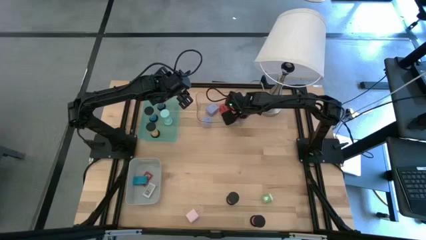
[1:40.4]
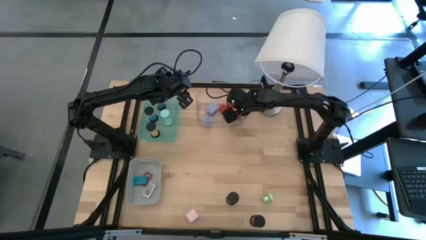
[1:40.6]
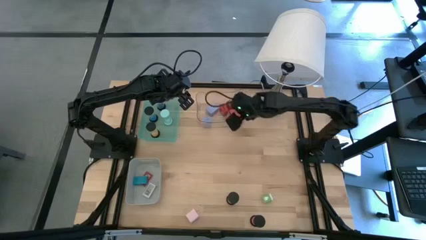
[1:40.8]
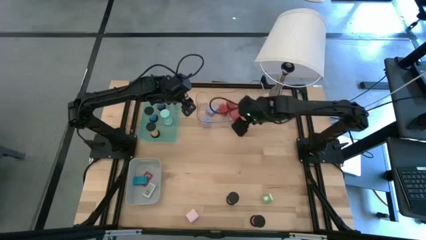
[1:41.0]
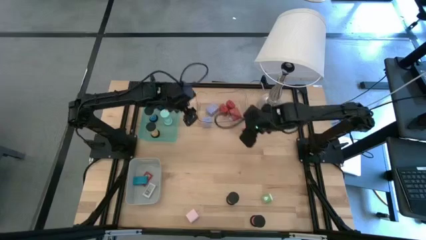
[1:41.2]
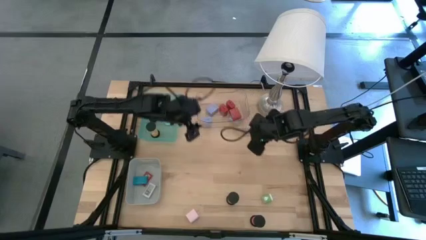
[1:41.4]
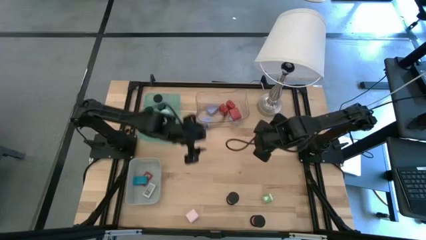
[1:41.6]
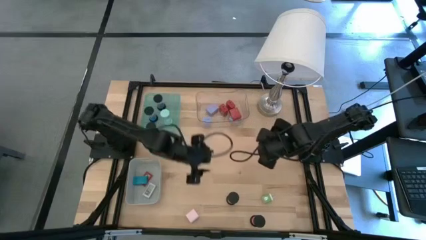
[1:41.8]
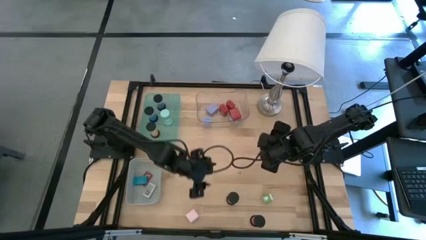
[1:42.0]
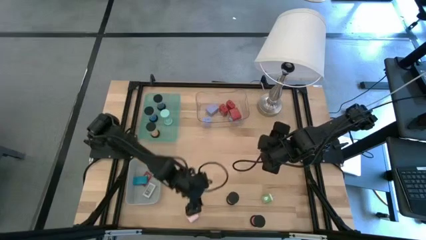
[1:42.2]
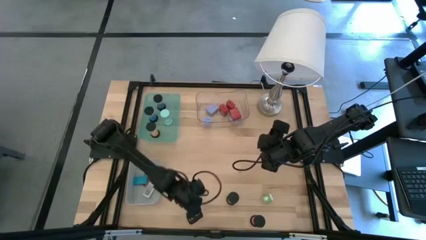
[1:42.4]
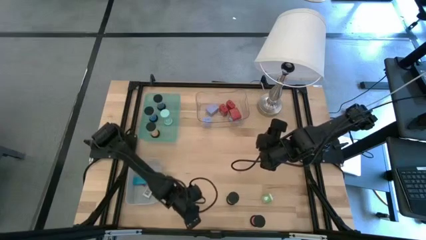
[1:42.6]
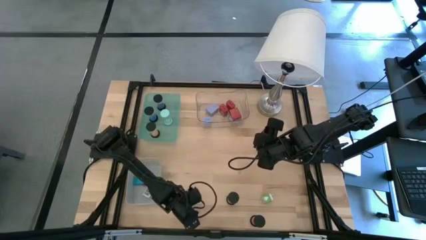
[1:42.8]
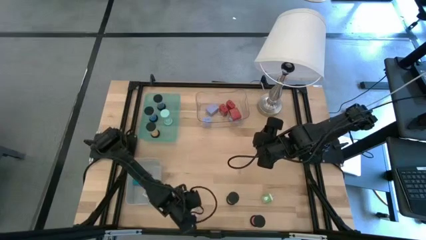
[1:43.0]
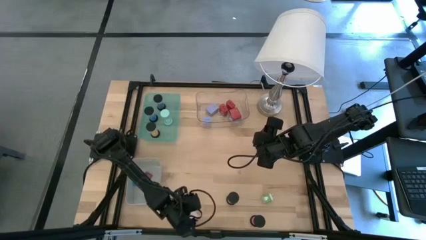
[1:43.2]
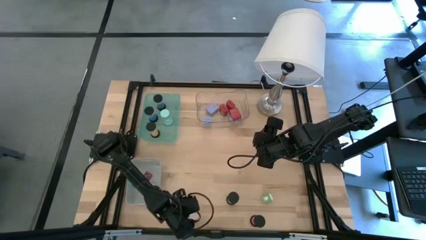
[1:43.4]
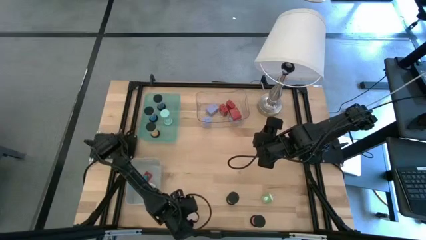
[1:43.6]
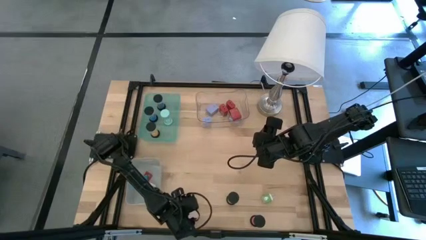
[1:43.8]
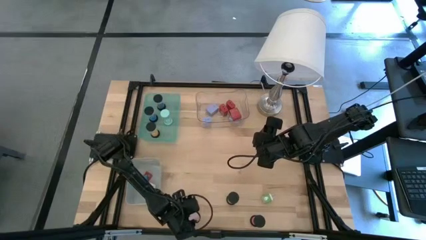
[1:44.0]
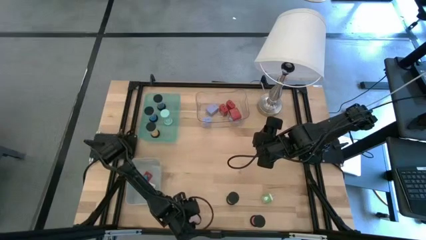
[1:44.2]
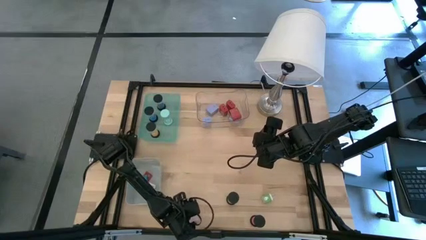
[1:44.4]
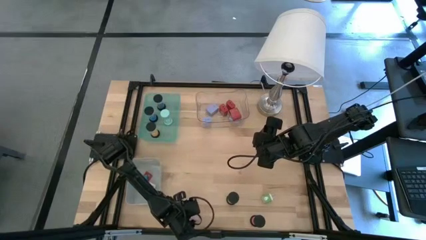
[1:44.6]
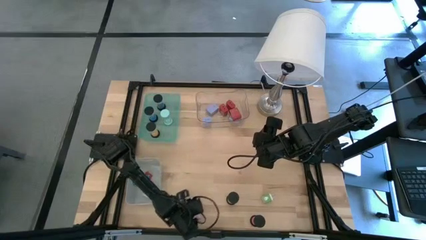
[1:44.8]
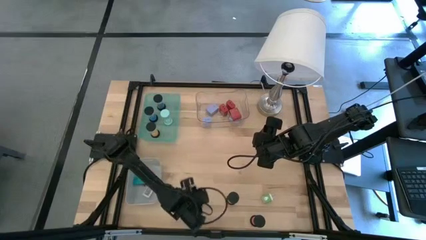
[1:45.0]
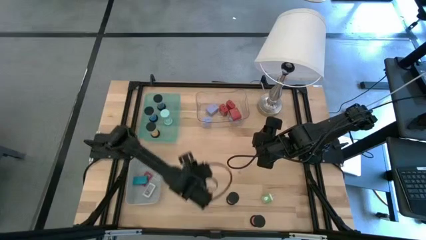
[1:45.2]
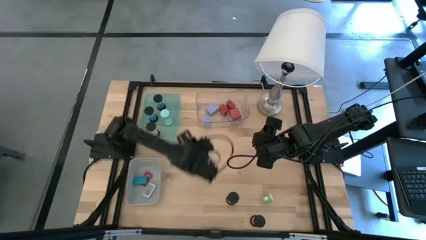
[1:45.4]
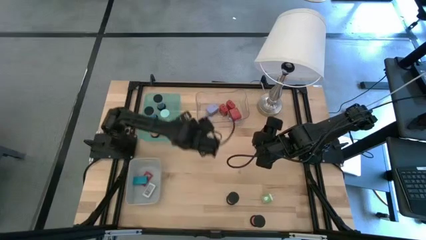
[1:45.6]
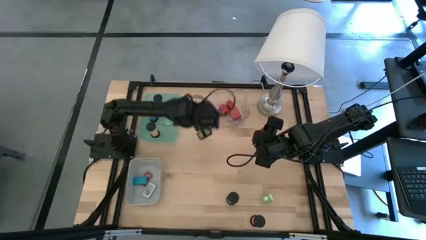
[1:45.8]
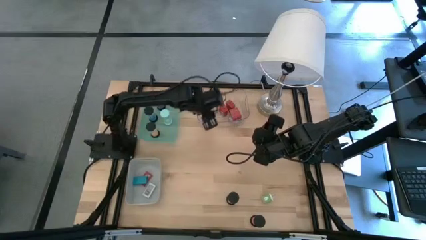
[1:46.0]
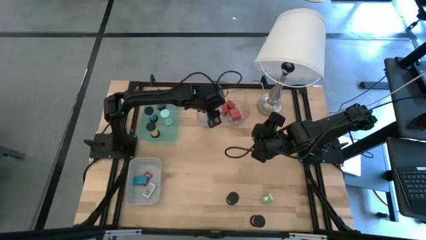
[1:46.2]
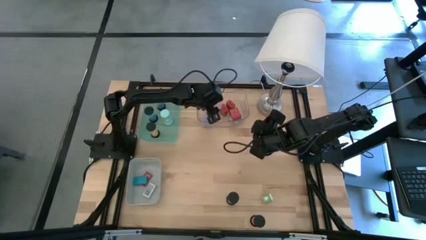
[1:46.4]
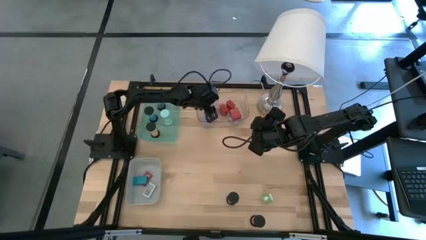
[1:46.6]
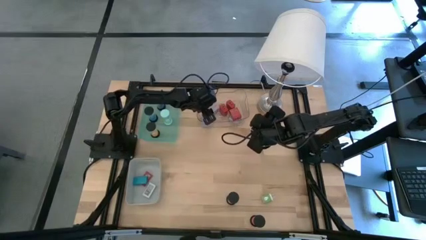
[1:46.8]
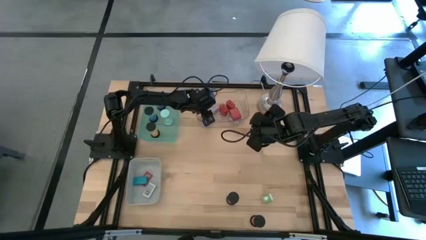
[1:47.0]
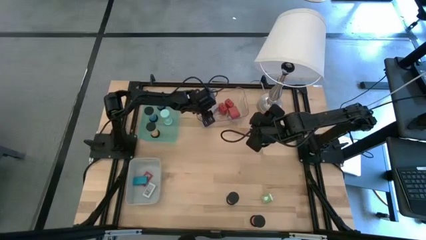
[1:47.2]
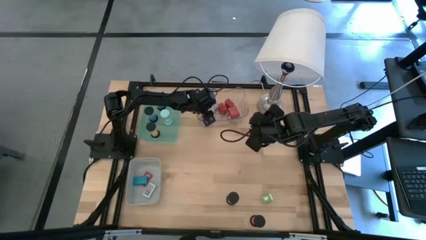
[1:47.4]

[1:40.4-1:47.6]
Task: Pick & Place Office items
Put the white charger adapter into the transparent bin

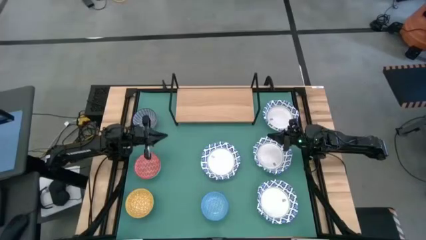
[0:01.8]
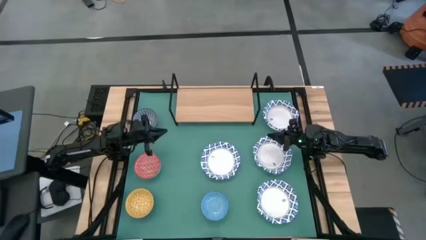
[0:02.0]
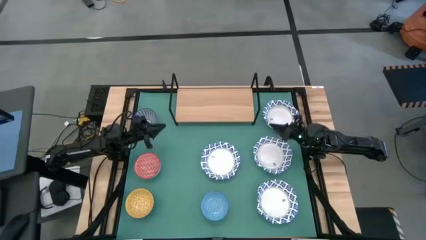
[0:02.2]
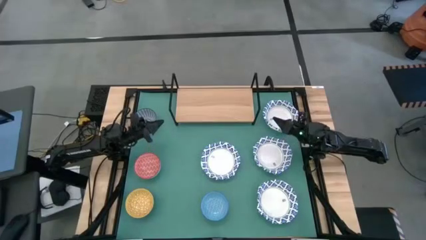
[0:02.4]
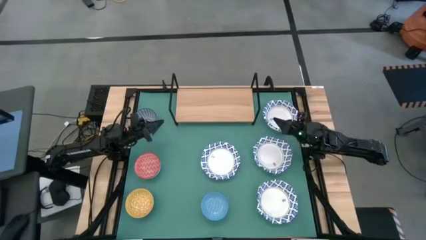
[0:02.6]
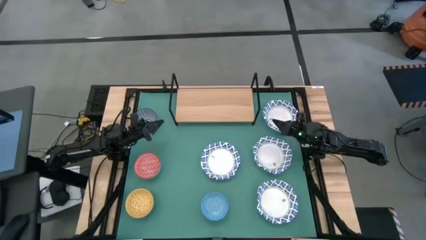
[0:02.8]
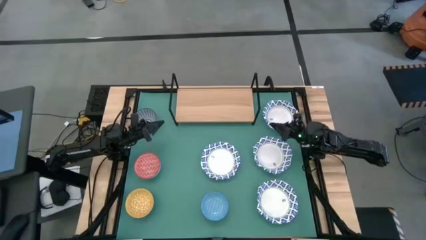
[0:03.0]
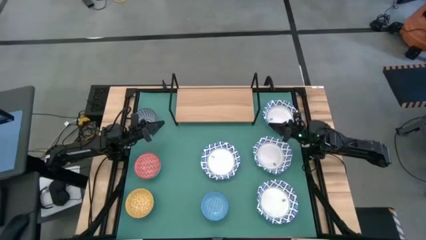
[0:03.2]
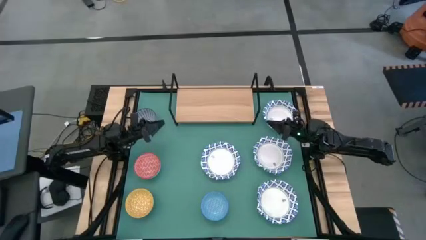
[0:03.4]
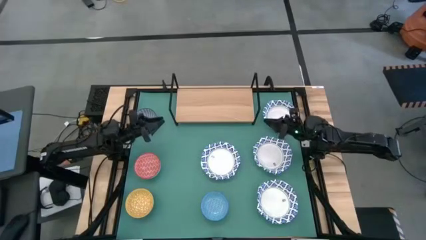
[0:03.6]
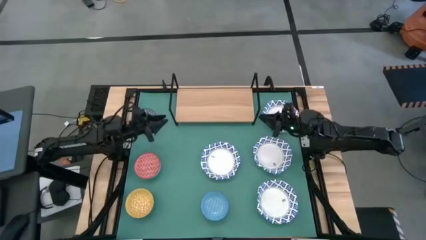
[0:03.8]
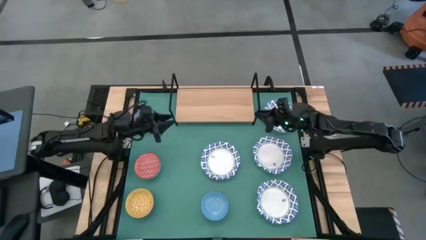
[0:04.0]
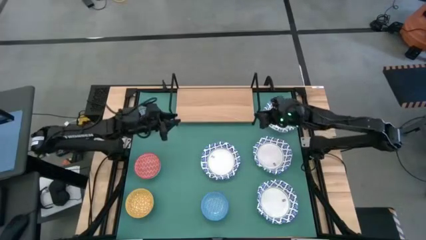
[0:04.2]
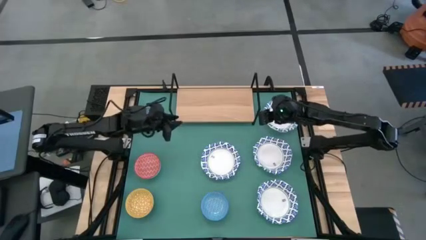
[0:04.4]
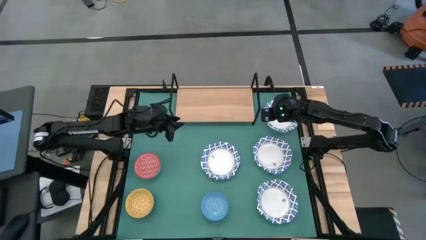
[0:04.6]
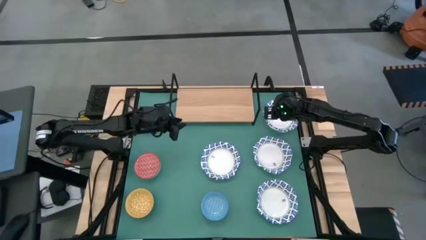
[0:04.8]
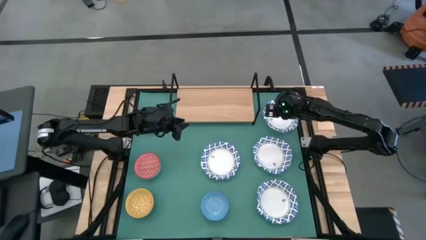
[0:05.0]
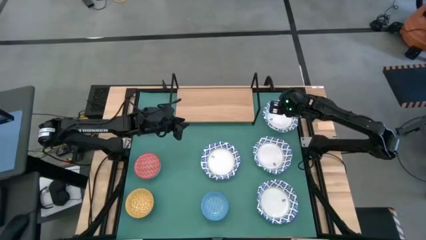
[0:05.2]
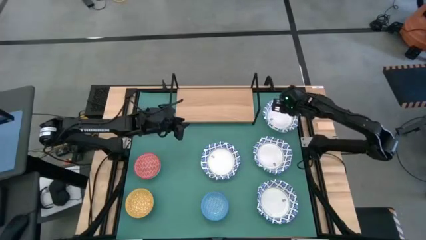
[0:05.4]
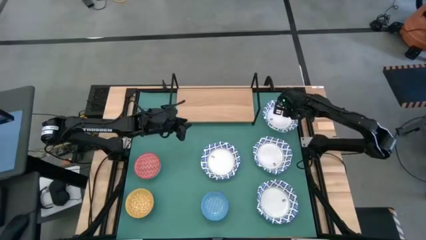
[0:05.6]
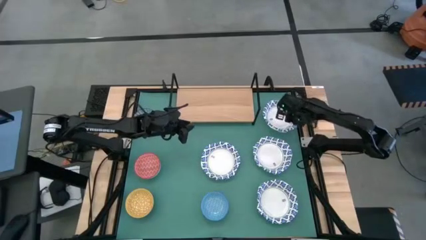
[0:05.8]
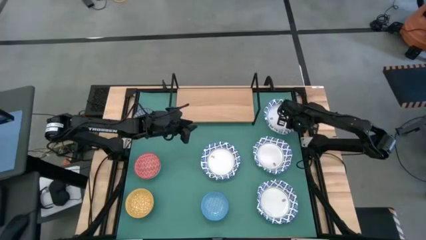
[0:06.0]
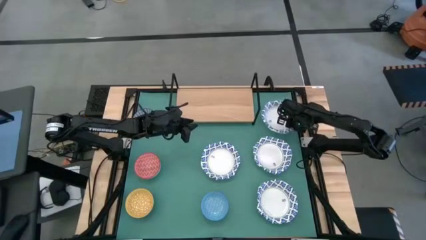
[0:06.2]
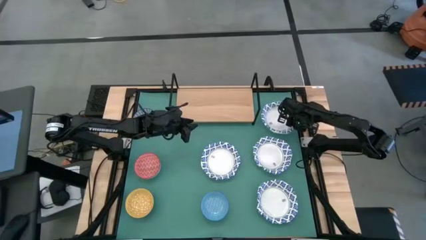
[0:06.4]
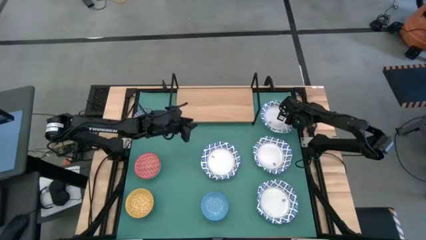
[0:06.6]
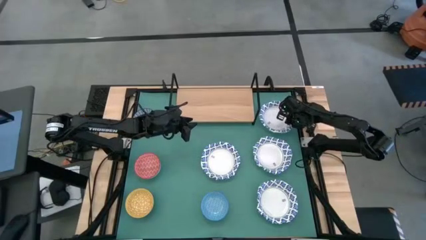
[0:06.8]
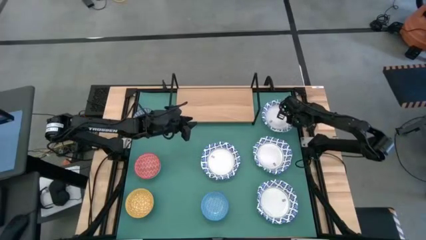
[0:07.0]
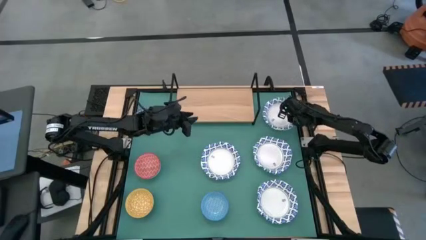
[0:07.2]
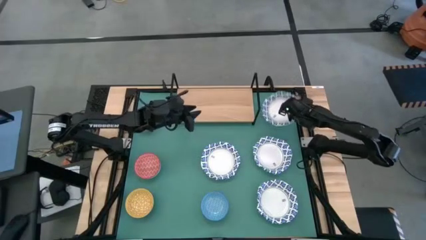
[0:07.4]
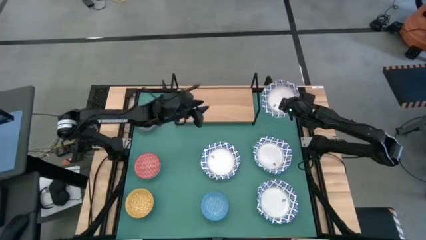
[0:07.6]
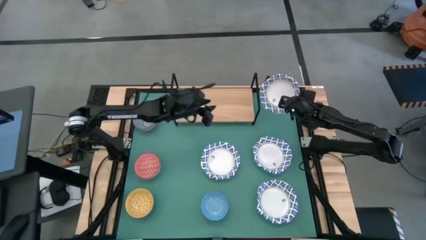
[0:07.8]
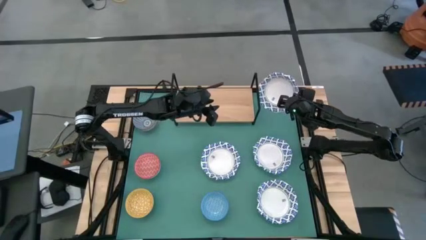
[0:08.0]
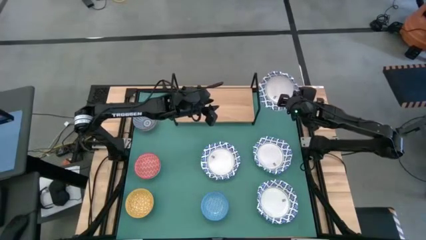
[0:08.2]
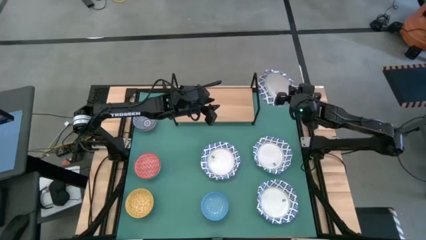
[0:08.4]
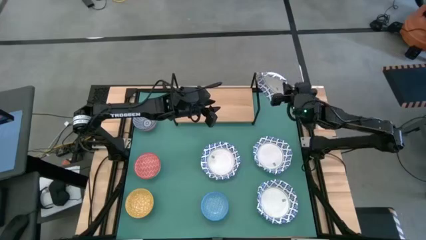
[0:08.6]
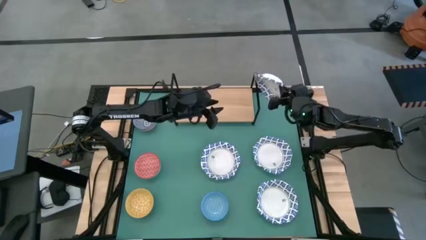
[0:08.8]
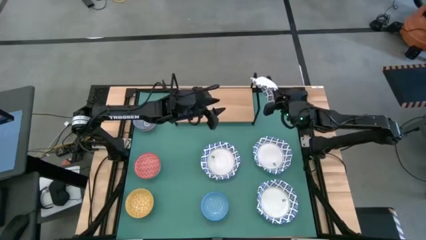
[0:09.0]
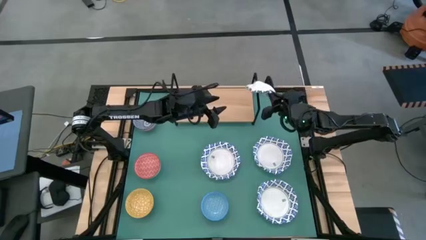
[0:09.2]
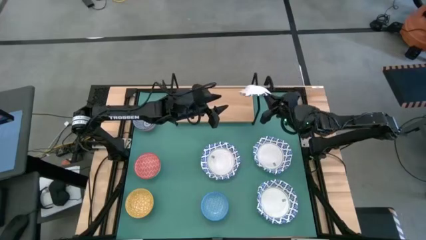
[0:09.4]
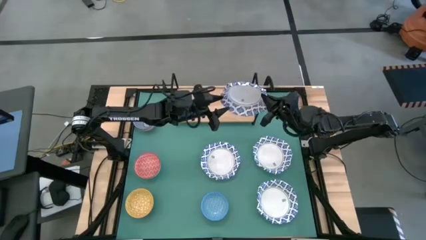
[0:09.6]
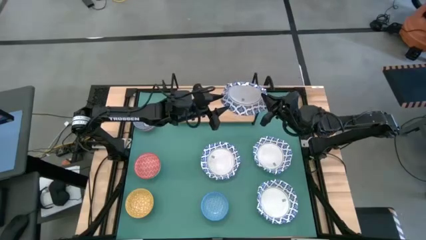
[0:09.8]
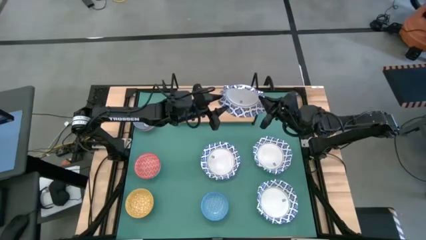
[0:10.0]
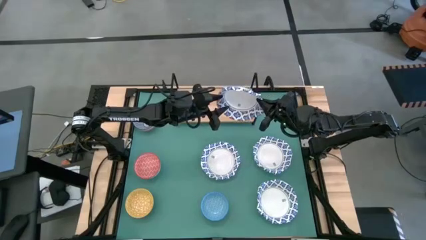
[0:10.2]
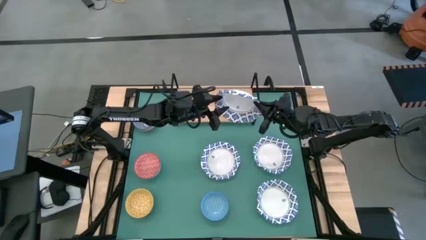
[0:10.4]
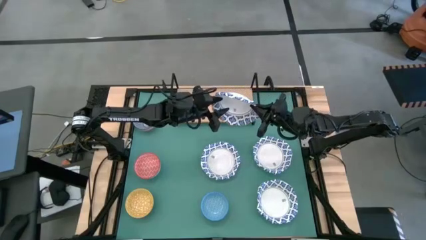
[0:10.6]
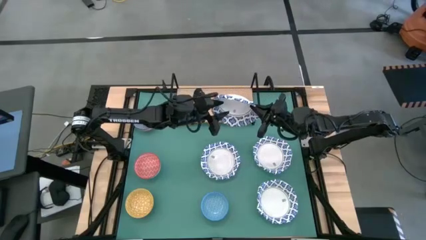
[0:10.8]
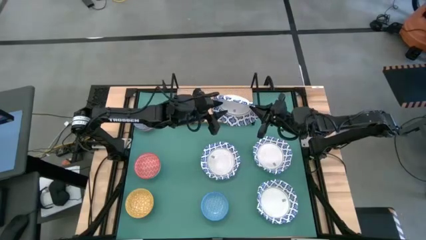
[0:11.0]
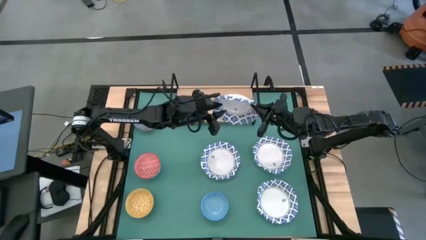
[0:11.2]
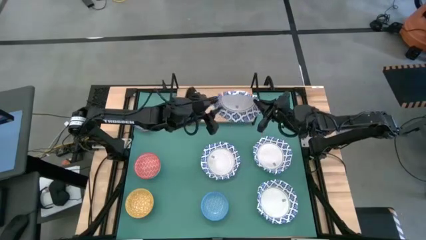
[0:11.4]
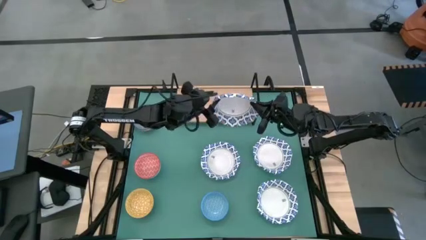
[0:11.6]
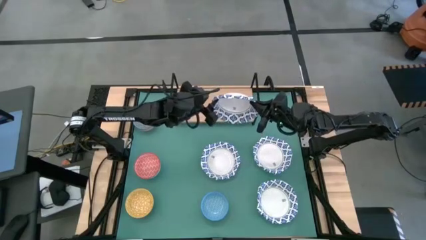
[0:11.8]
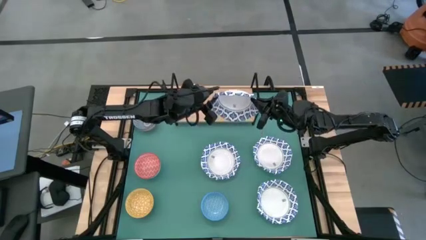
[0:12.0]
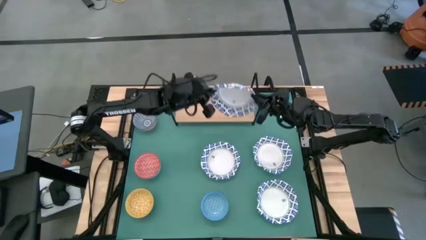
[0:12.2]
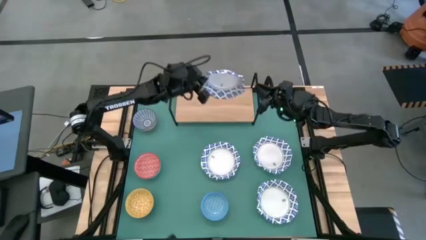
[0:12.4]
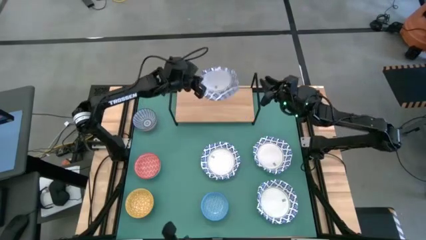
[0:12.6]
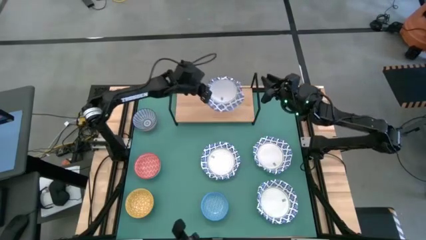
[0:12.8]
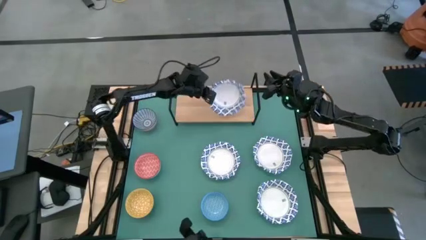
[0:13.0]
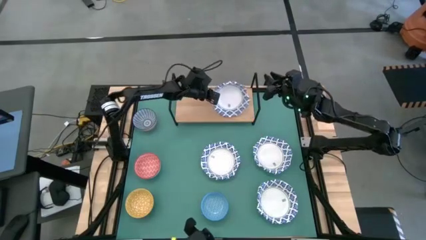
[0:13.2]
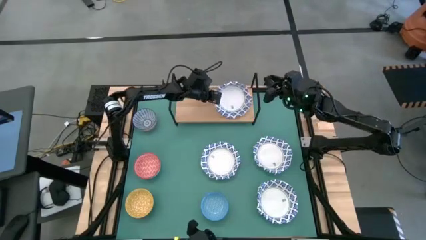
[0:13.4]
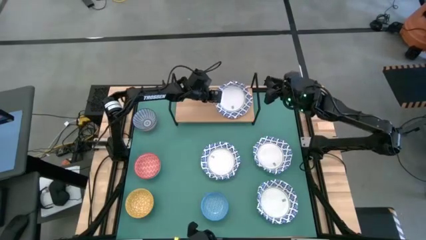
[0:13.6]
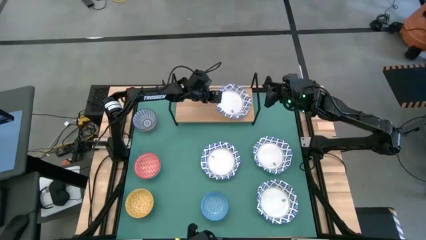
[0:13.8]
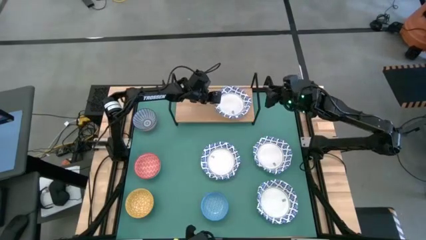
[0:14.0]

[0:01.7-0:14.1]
Task: Place and stack bowls onto a shelf
Put the white bowl on the shelf
